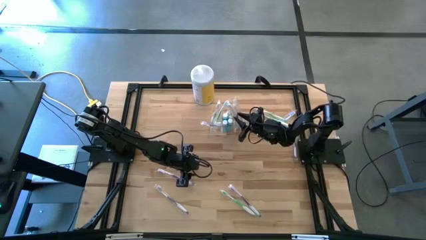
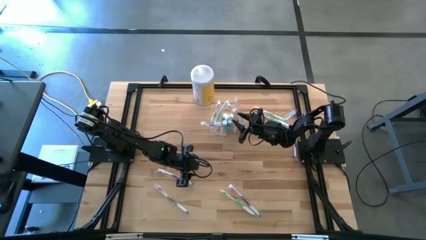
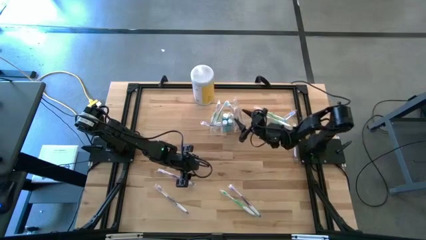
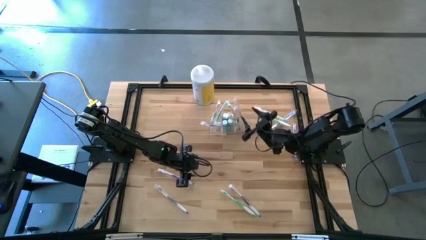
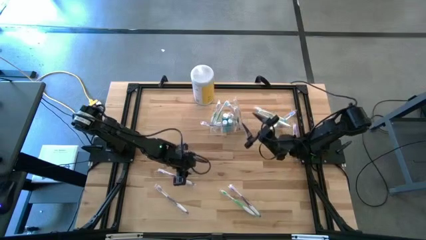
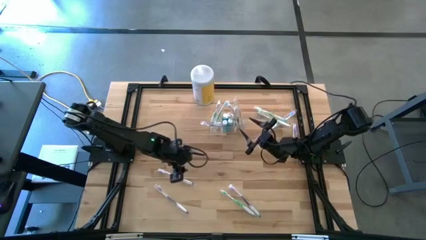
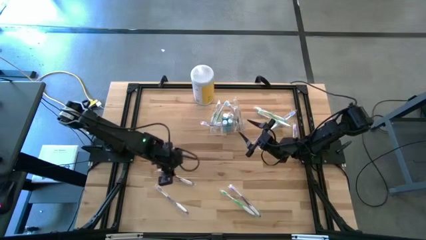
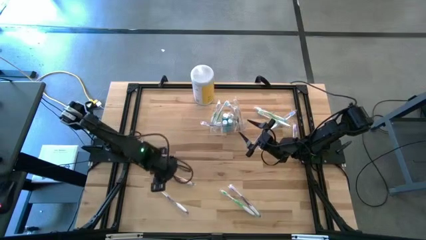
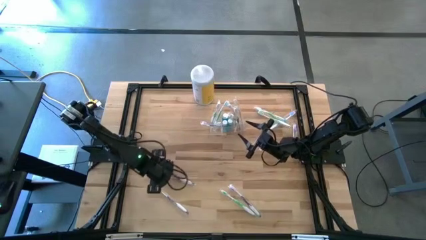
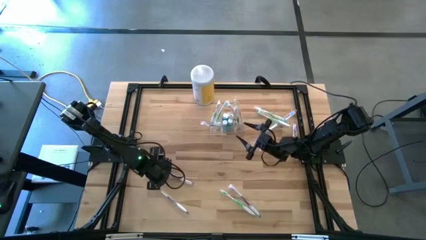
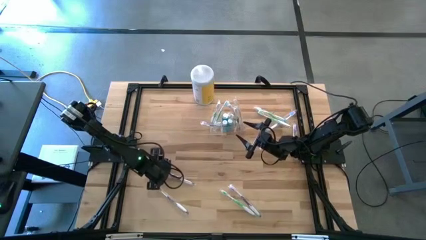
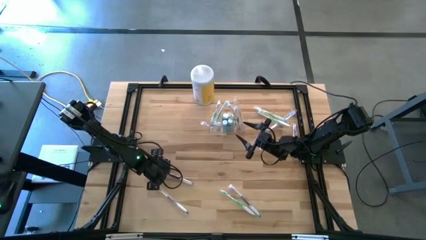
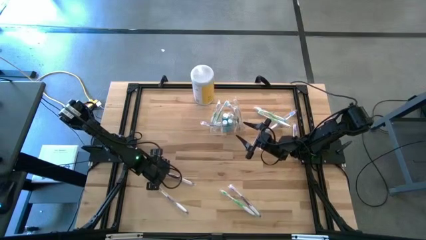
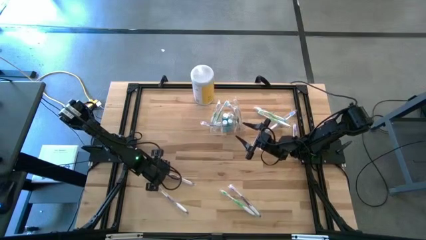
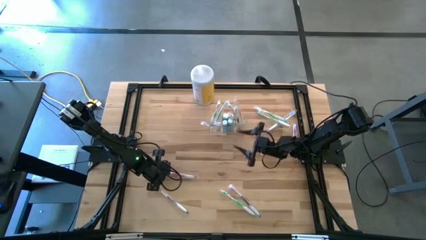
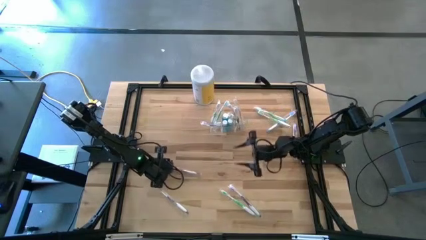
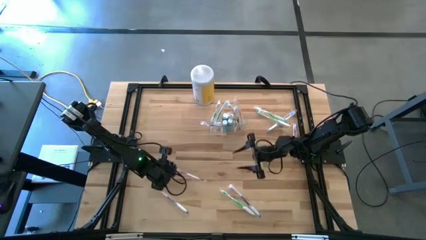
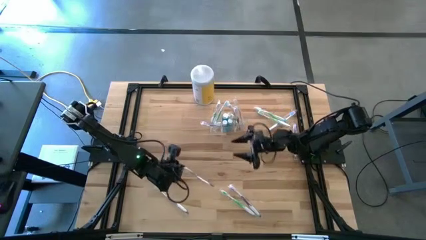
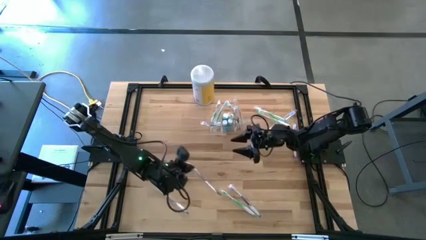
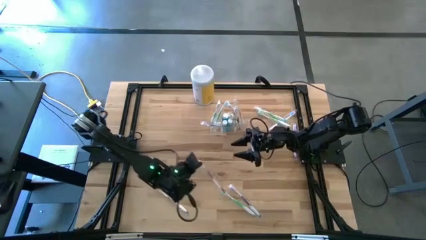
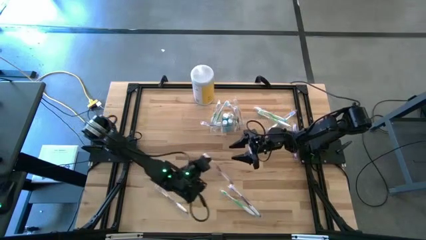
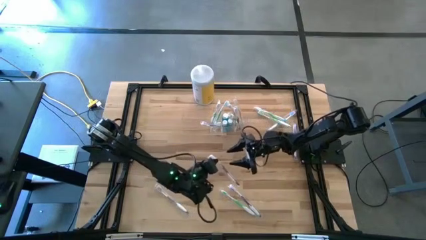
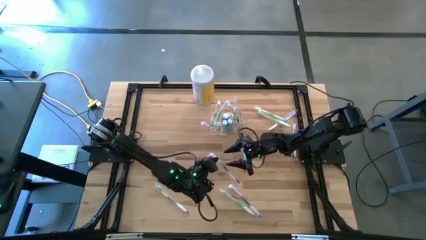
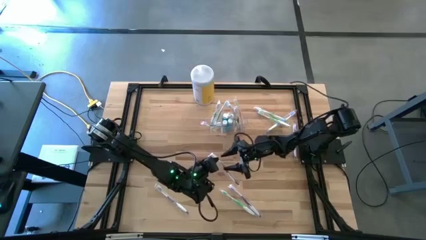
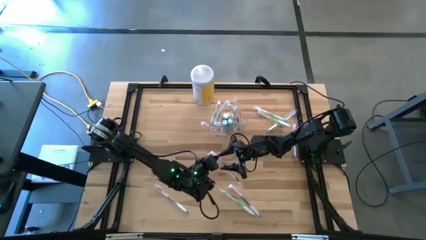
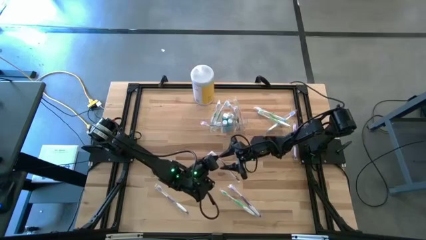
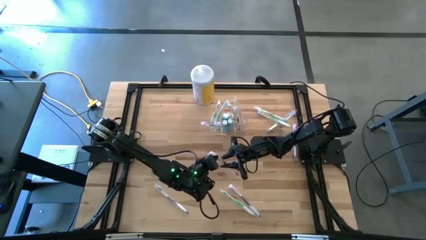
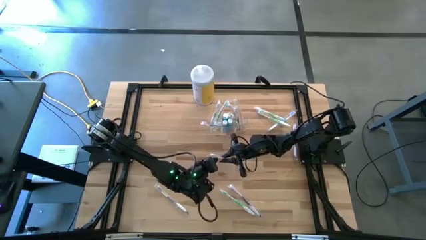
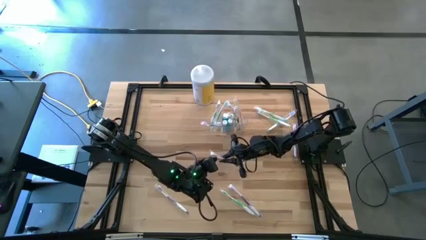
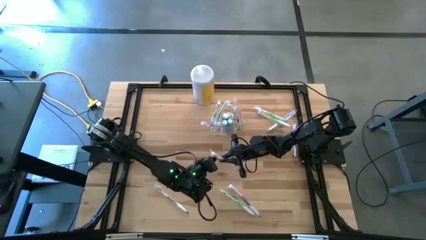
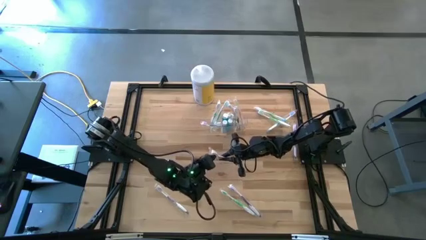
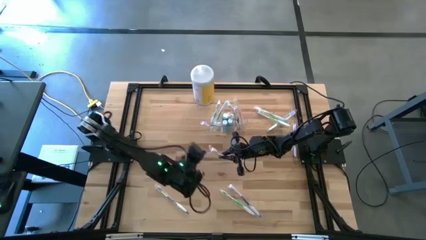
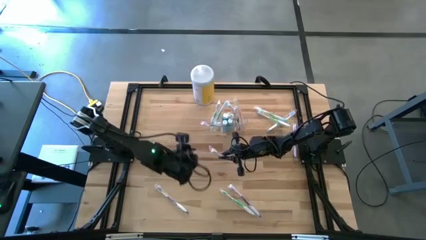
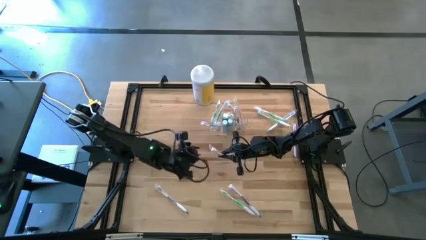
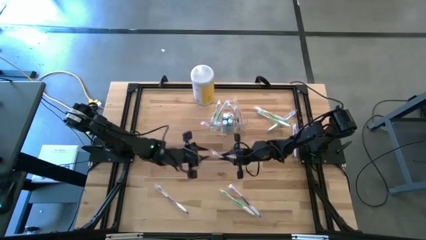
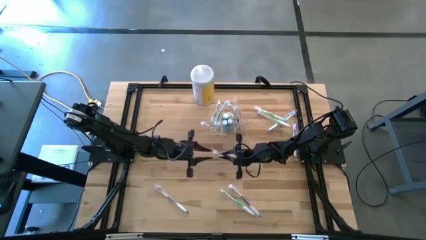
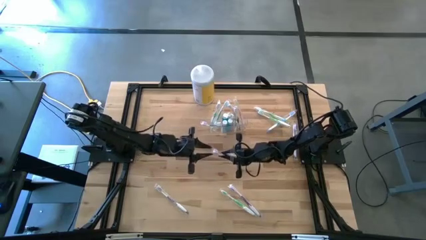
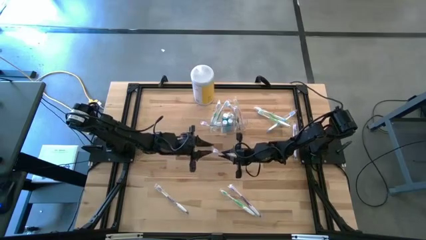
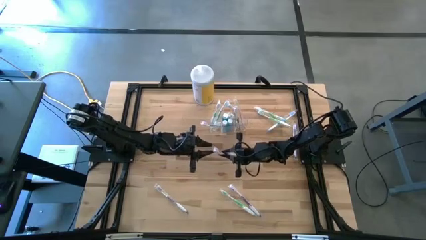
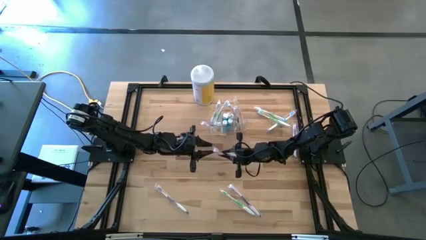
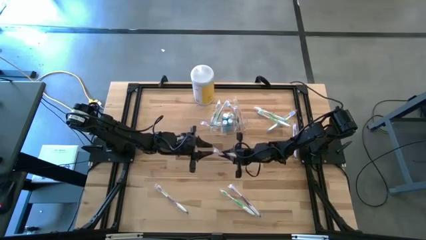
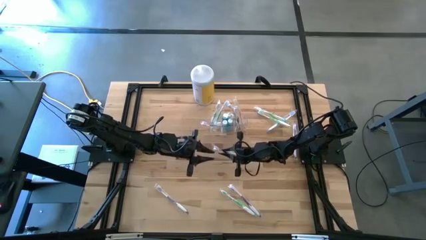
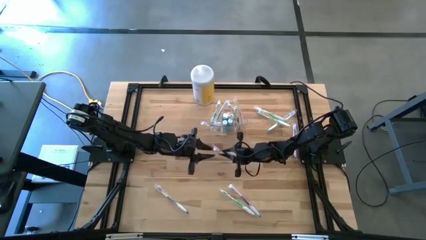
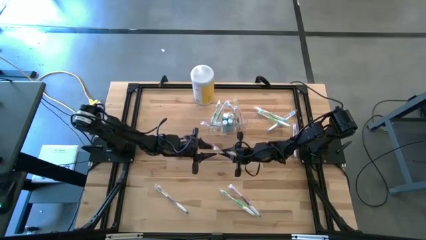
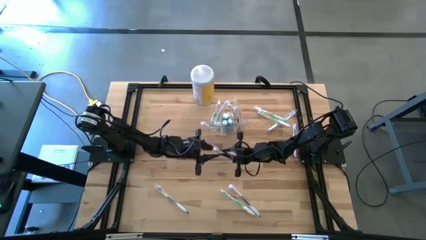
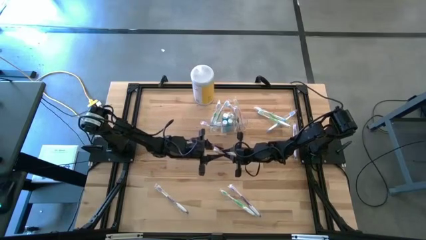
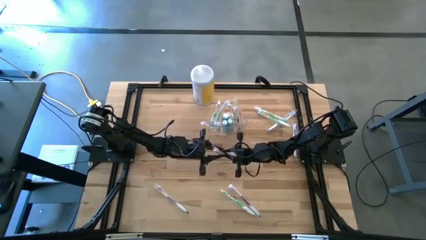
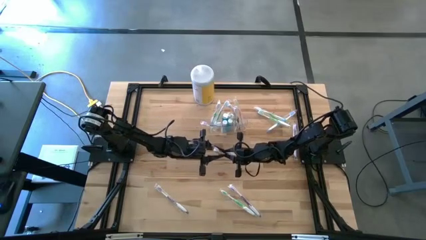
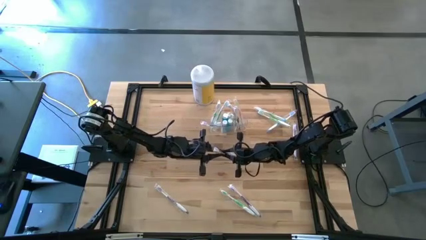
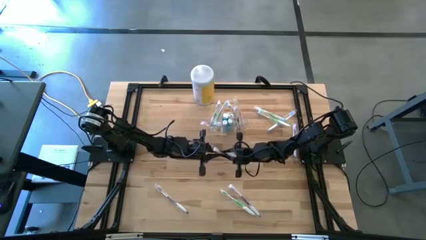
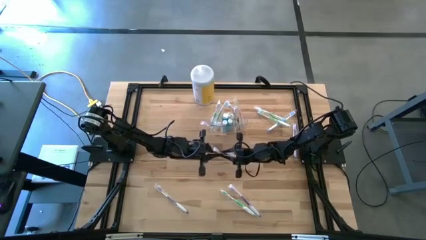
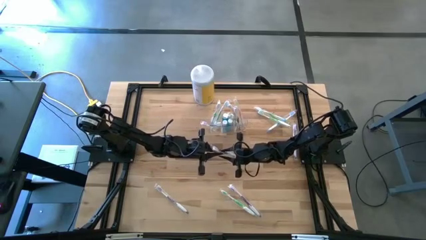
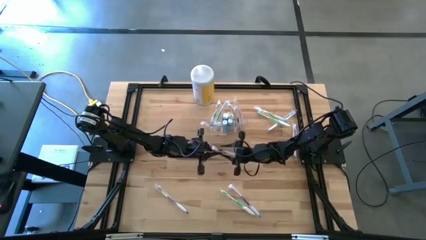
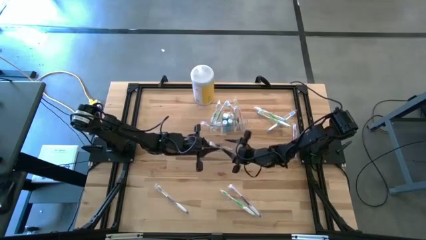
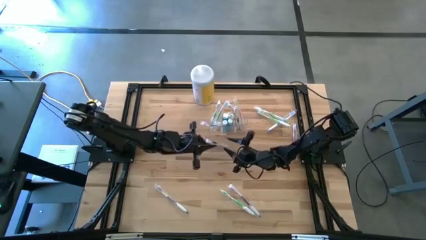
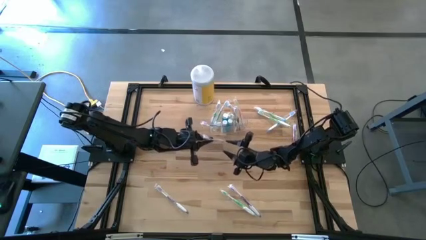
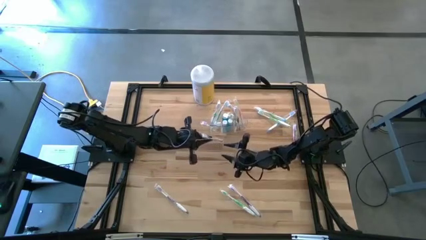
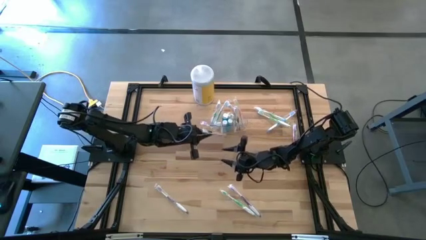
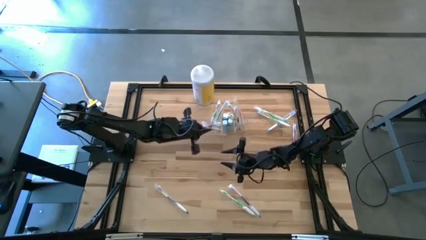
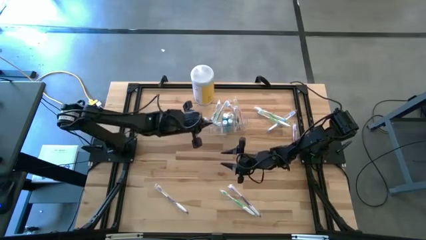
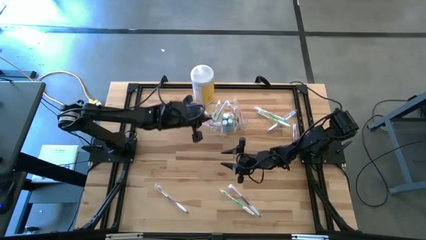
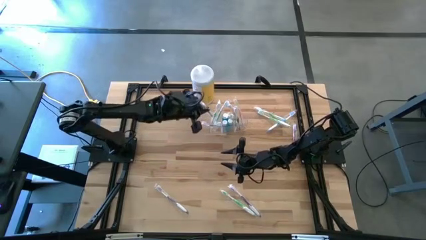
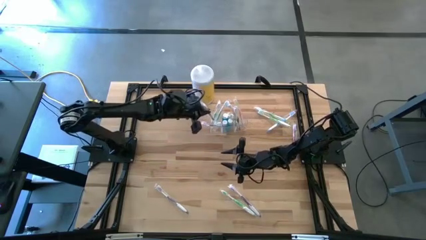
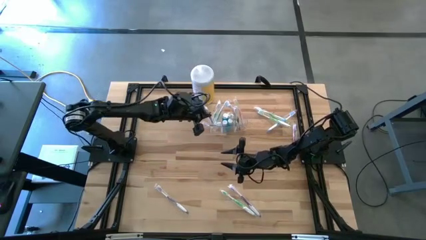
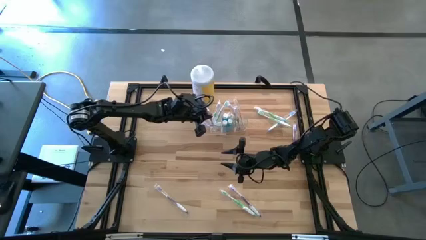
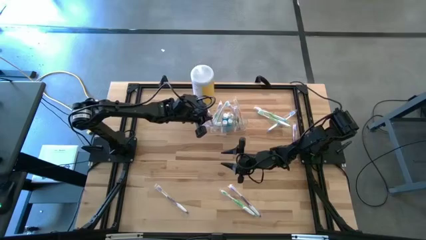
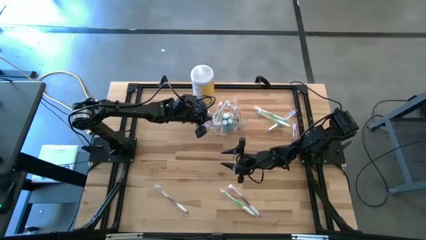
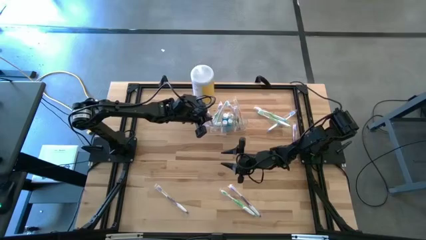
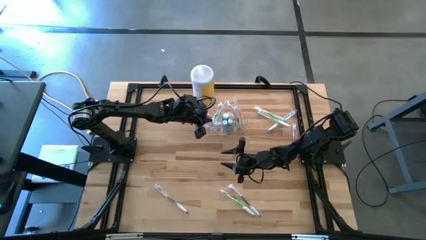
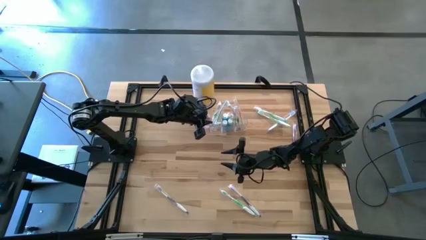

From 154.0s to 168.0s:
Task: Pick & Place toothbrushing station
Put the purple toothbrush into the transparent organizer

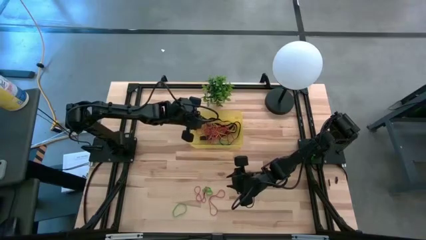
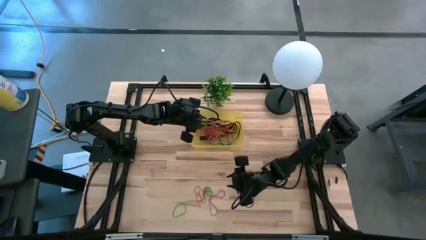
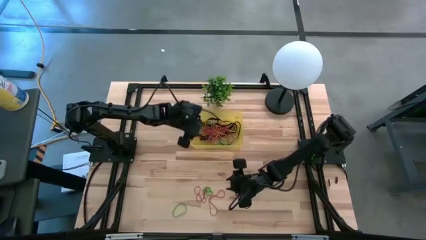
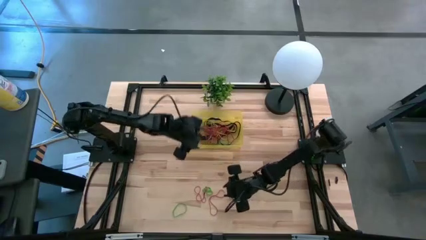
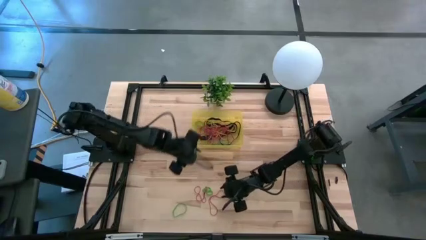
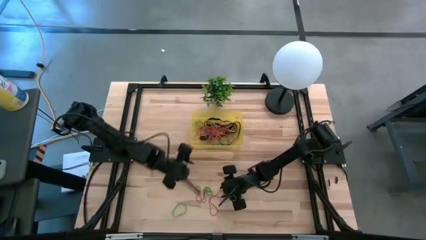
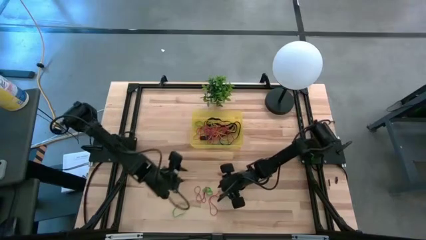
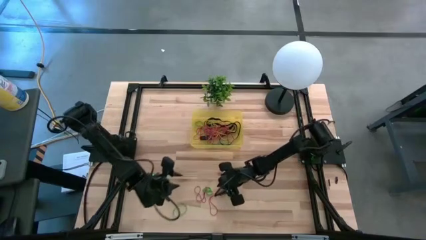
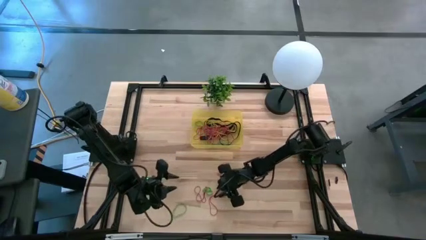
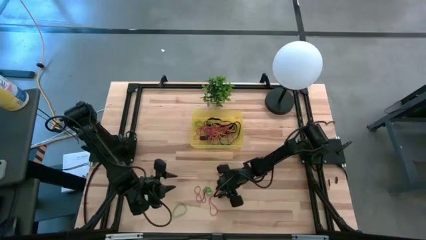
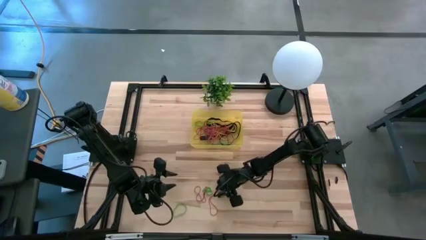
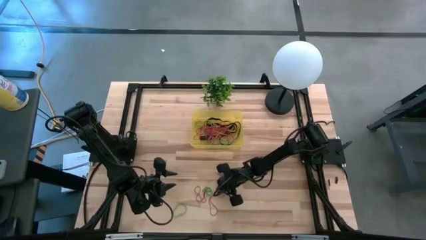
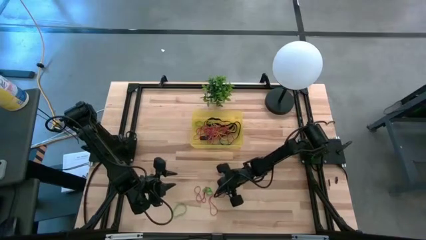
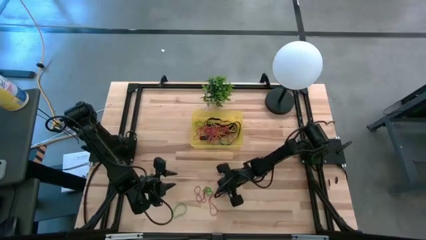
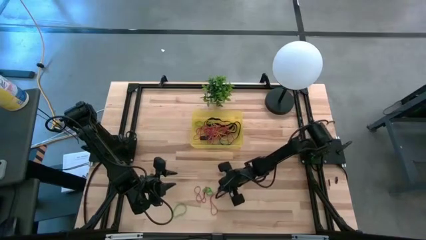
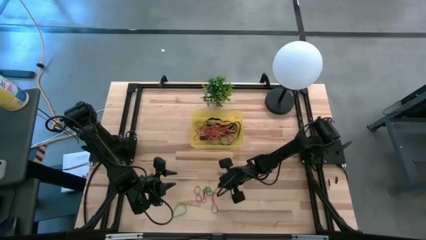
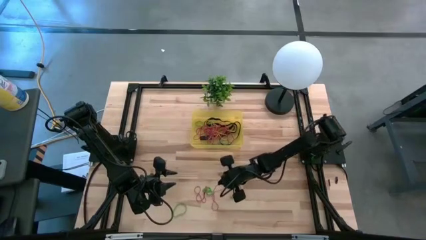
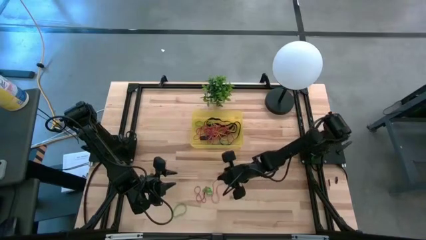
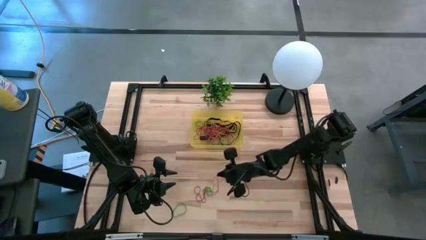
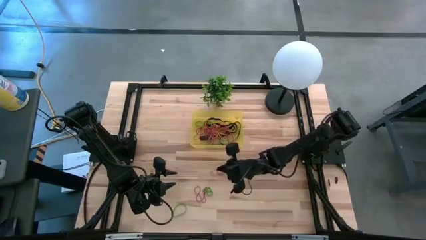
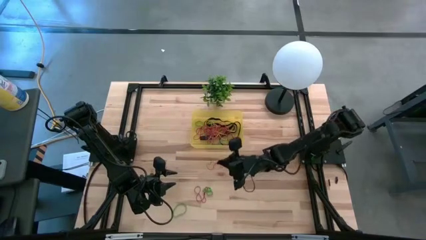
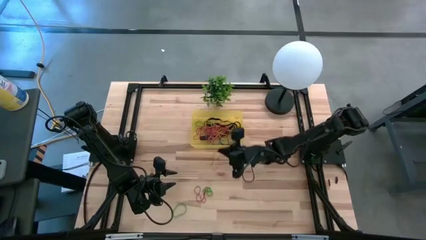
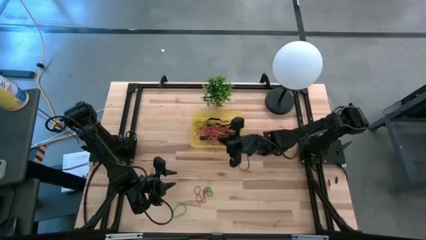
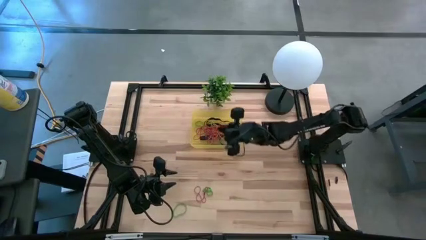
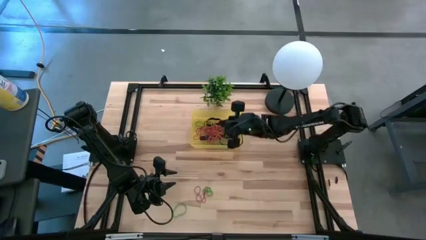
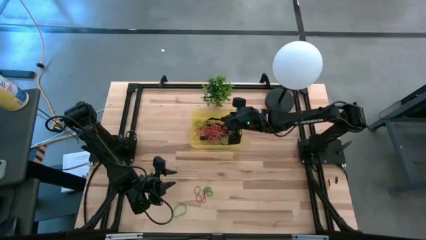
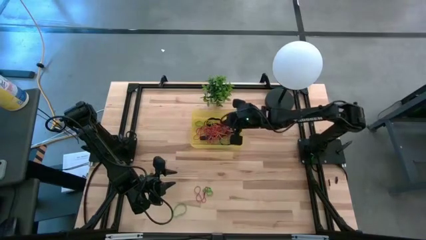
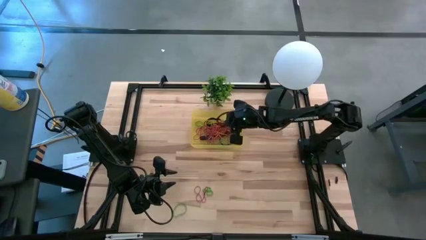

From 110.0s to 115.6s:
Task: Pick and place rubber bands into bin
Put the red rubber band into the yellow bin
